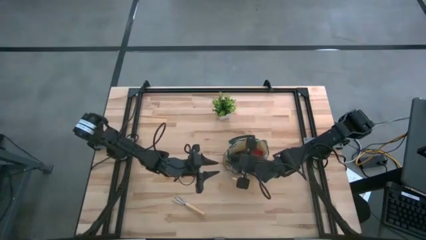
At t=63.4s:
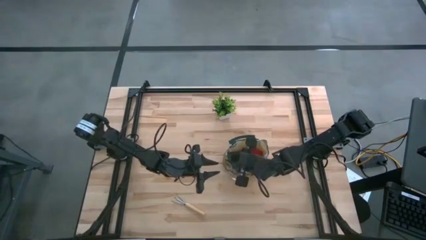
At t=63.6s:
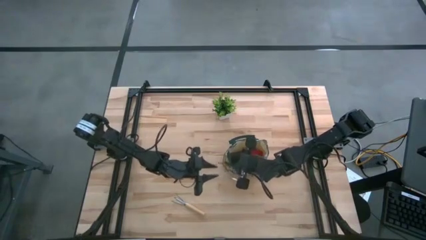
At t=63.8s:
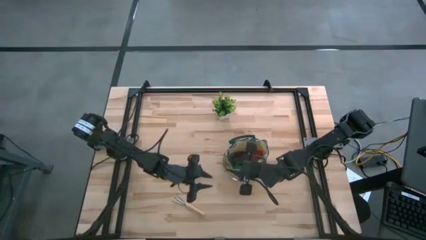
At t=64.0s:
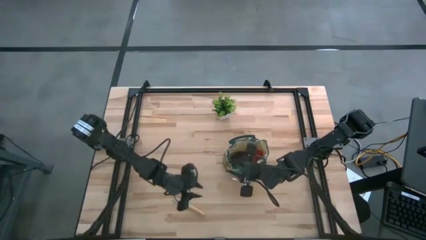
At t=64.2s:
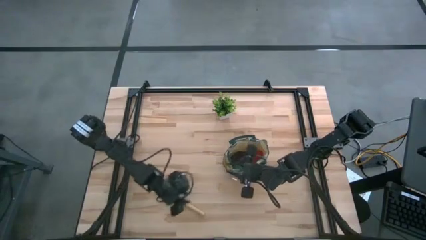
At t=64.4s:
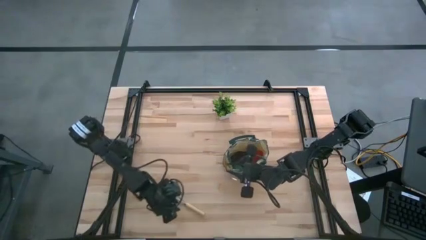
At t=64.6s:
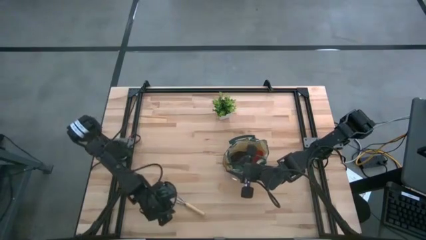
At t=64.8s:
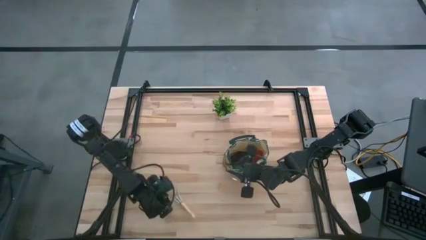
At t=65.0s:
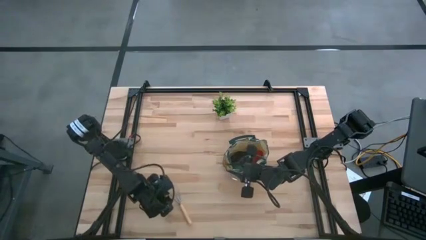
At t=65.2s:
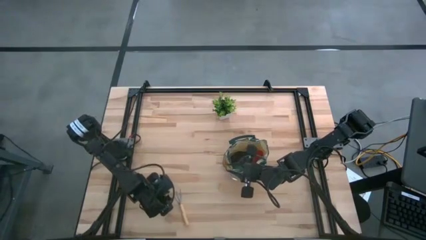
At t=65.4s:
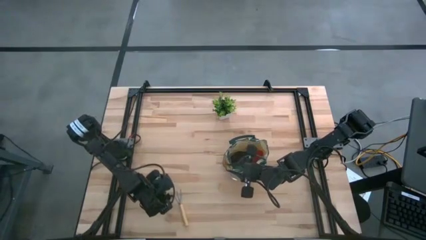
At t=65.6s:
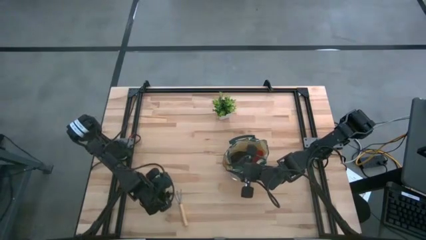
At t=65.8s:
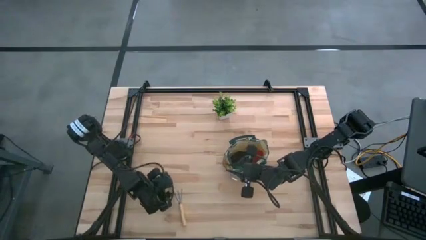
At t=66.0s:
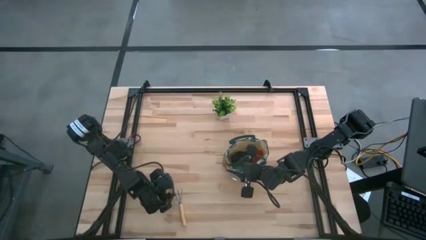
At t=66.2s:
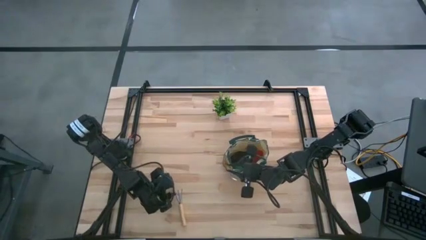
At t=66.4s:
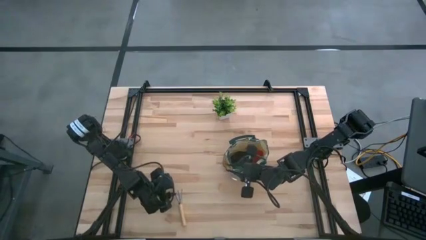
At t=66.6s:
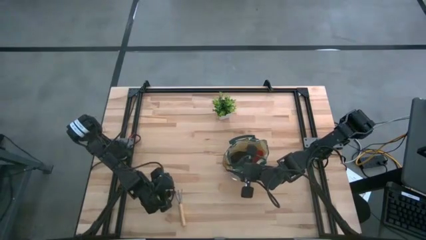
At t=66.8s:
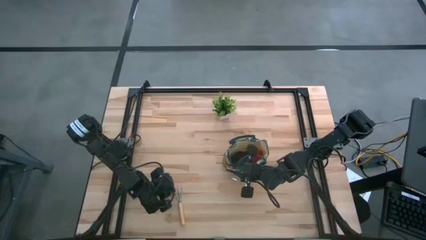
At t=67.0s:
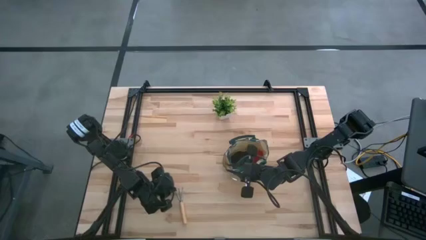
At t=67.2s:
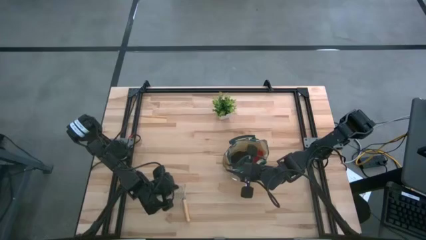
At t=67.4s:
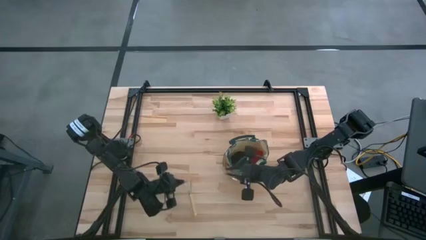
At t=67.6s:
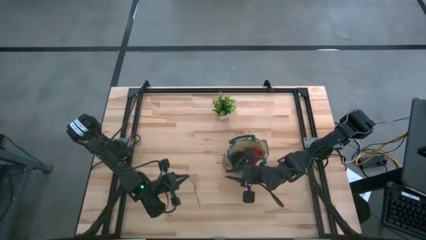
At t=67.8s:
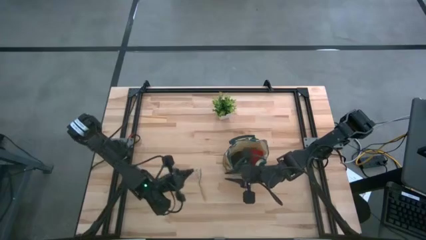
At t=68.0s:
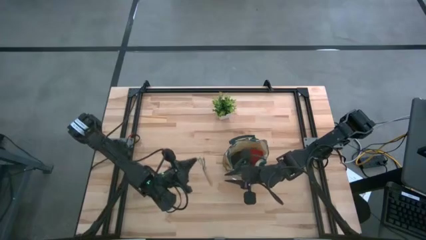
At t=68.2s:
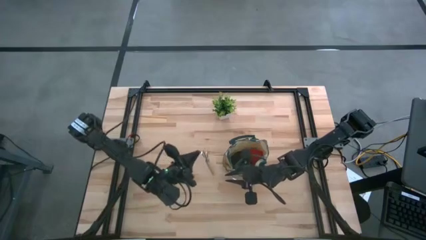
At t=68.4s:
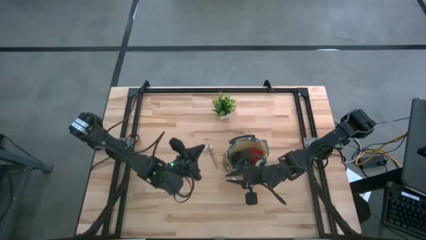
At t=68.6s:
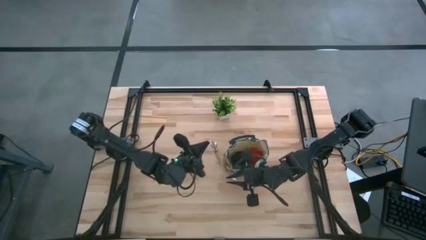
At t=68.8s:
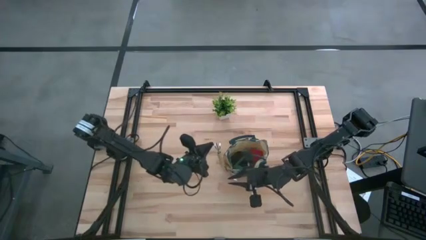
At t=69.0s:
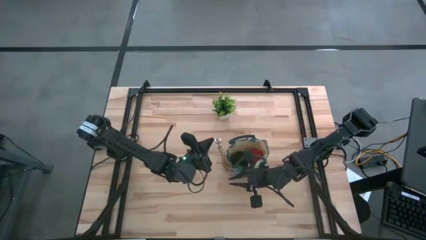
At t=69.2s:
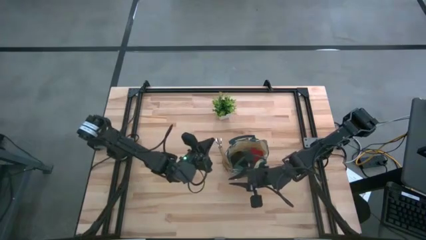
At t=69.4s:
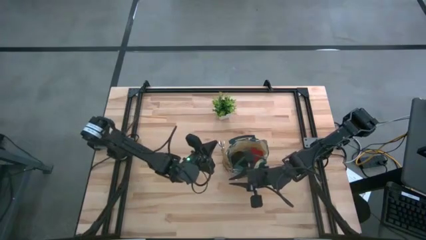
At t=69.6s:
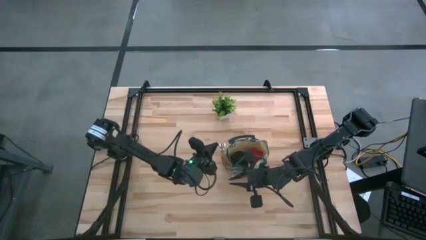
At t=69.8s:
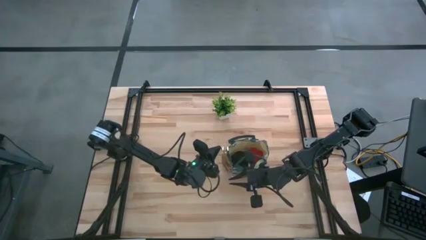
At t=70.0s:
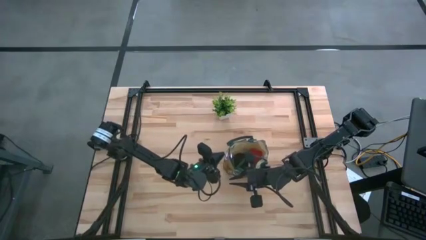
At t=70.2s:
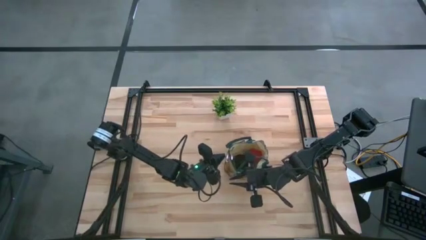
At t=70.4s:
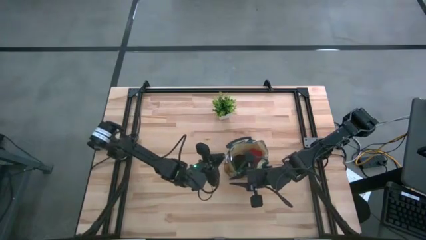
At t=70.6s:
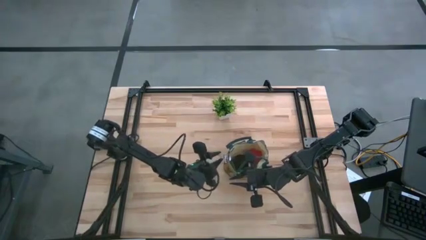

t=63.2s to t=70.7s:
Task: Pick & Place Garden tools in Gardening bag
Put the hand rake into the side pocket of the gardening bag

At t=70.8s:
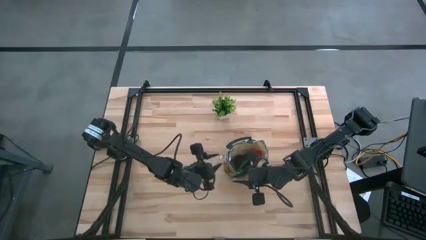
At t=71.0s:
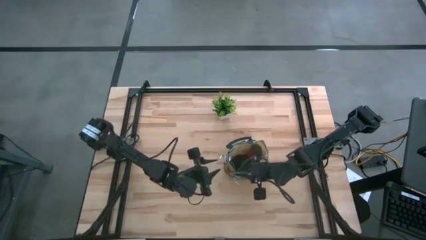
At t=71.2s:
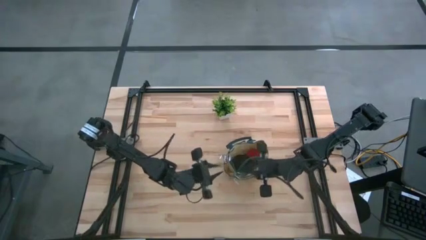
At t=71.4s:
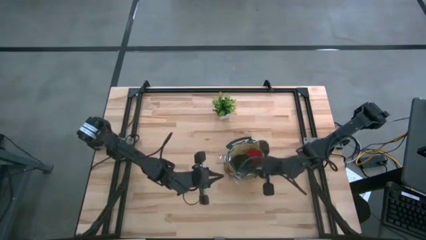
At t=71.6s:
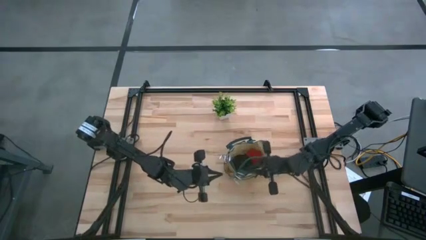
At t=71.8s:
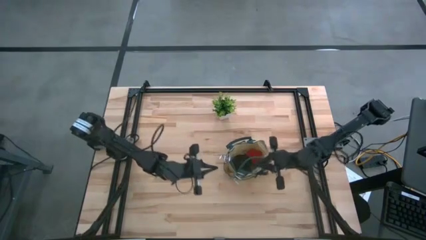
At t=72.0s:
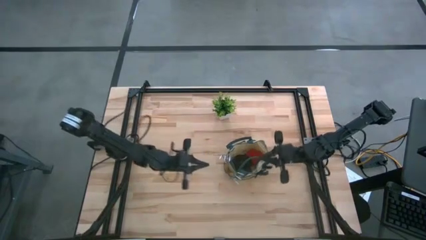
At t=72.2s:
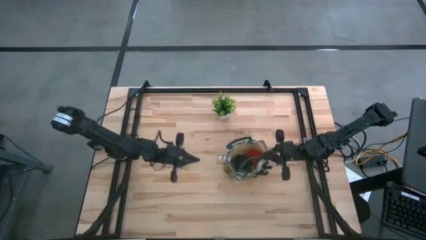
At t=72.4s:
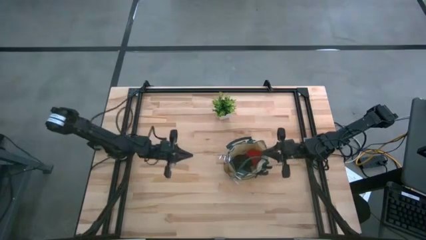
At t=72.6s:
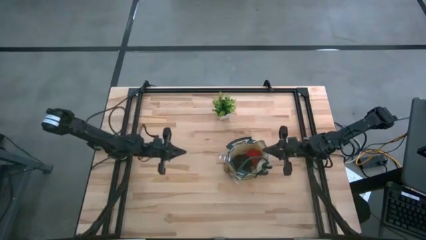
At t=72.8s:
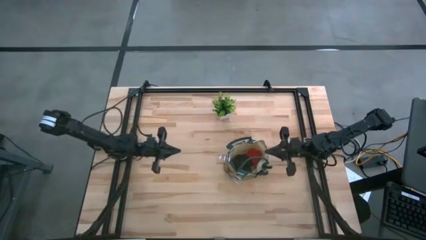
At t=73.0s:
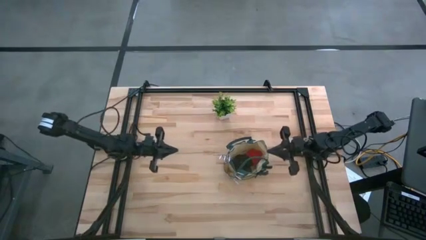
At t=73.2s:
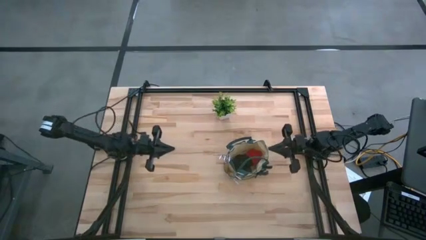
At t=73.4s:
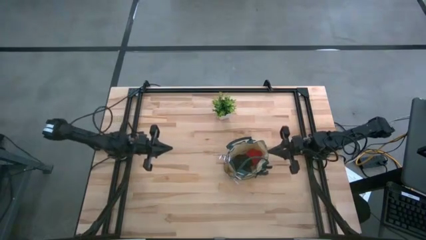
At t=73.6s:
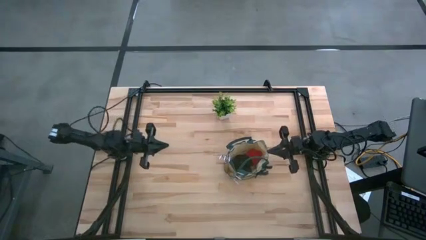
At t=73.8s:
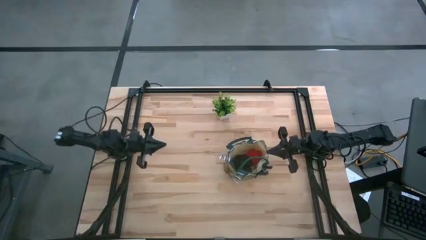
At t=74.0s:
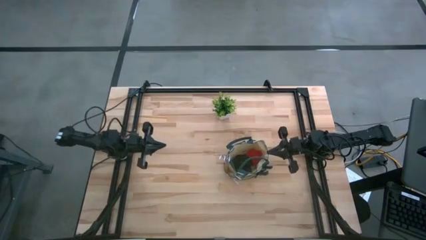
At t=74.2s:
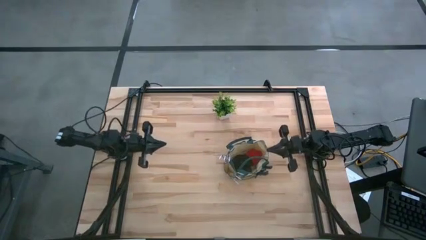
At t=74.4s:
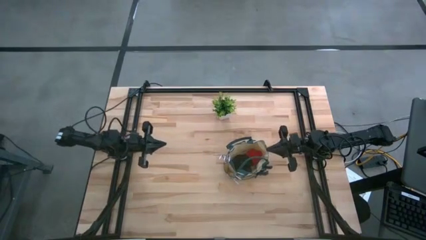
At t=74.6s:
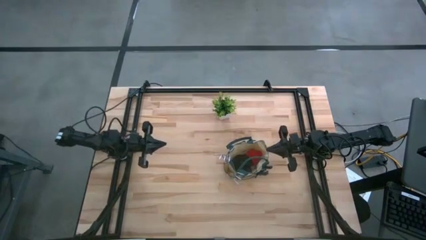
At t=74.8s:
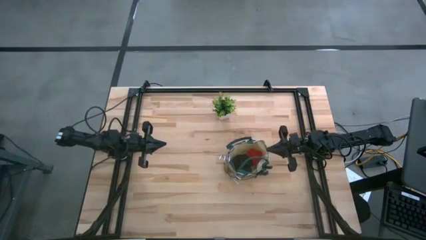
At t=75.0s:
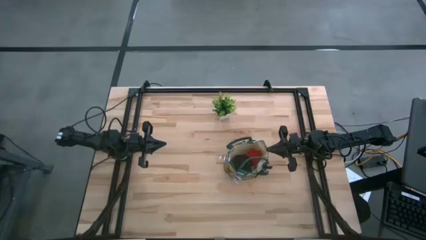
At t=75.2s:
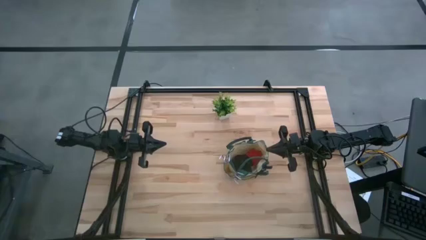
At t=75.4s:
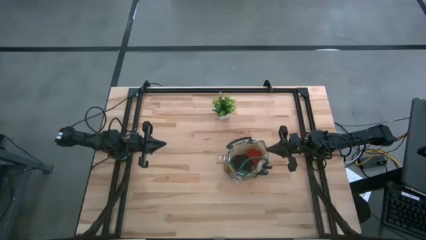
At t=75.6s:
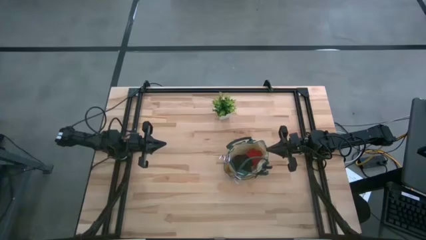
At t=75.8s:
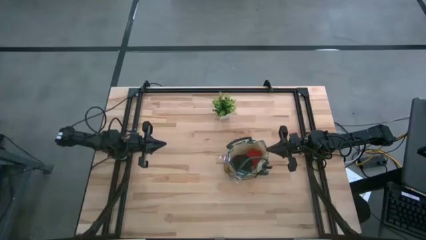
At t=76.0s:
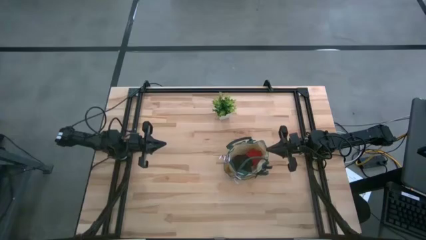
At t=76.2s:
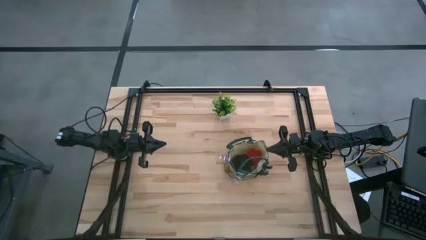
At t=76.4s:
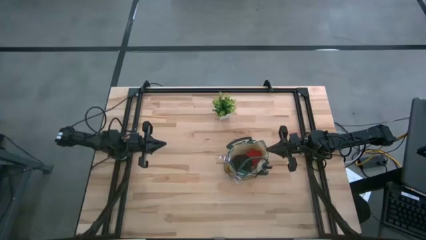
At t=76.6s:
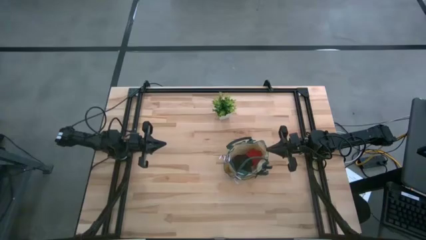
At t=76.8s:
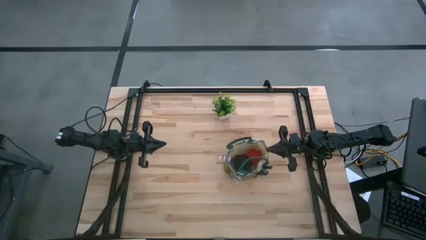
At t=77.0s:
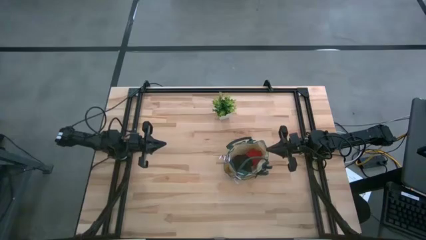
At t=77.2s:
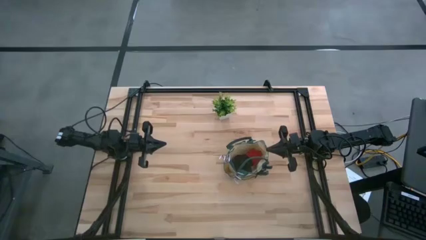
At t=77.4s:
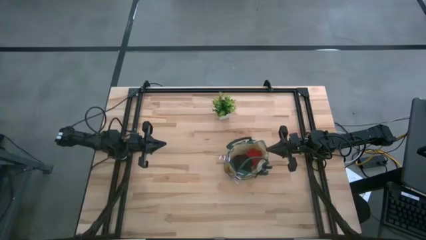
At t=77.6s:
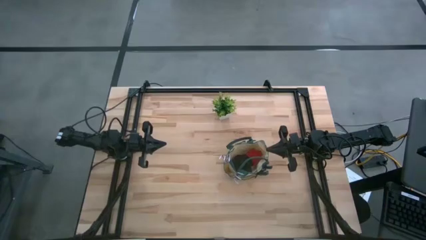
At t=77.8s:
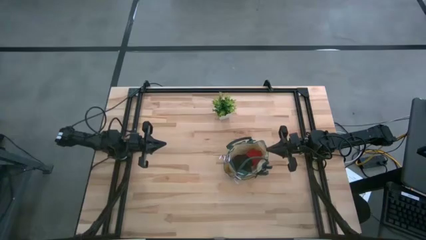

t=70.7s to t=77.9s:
Return to Home Position

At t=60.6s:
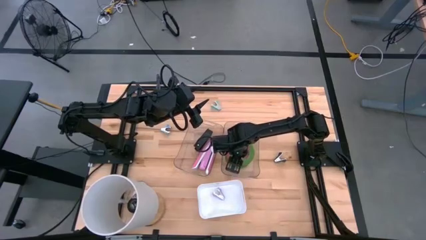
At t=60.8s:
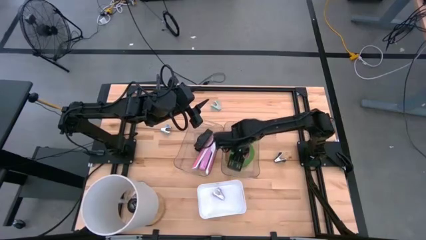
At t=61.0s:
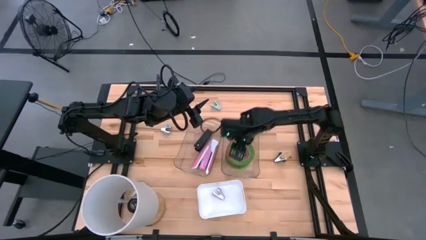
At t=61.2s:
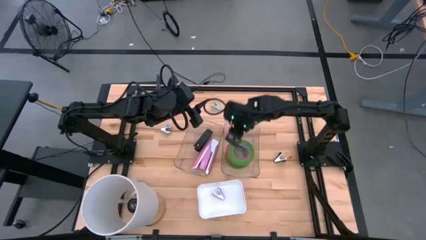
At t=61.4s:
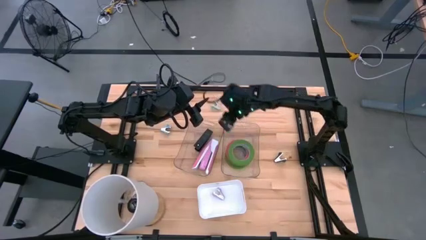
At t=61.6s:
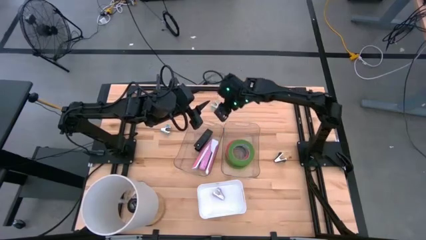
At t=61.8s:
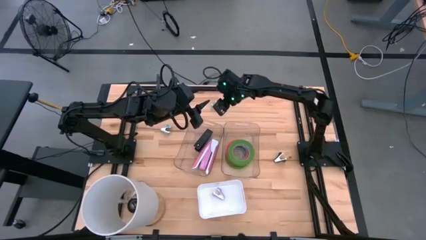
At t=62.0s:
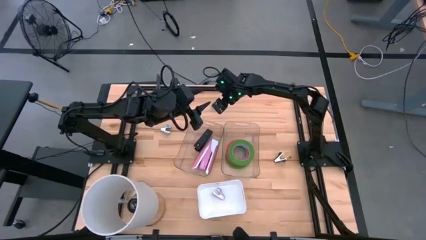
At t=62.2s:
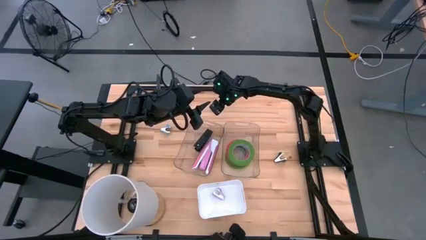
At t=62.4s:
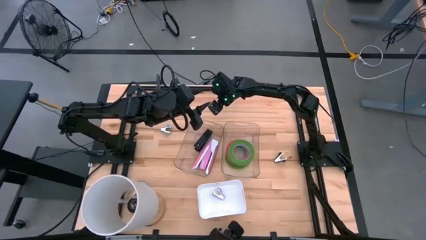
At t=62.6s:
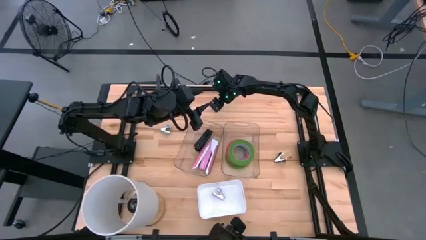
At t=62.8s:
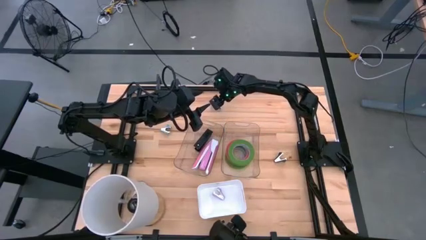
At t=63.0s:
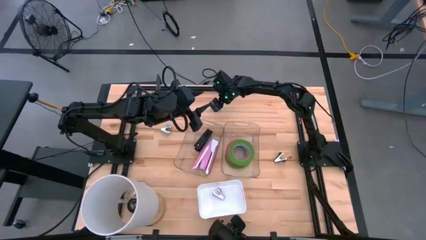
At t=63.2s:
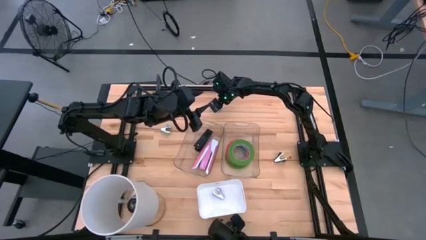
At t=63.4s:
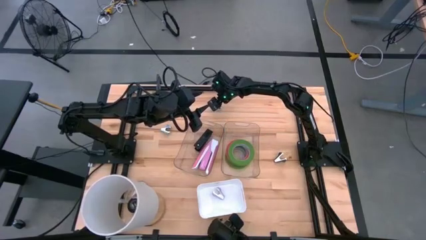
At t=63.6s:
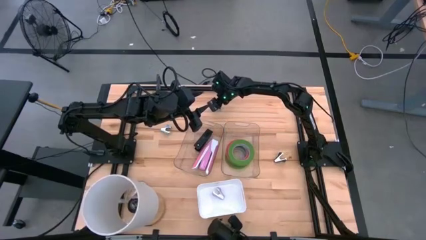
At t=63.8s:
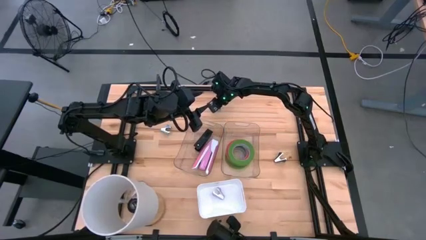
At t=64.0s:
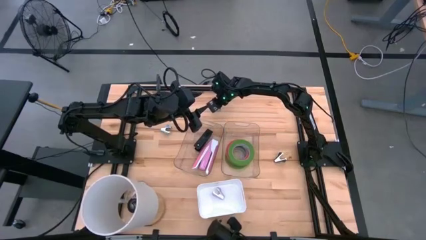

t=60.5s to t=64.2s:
Task: Pick and place Stapler, Stapler remover, tape
Put the blue staple remover into the white bin
